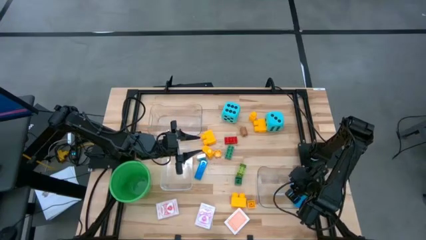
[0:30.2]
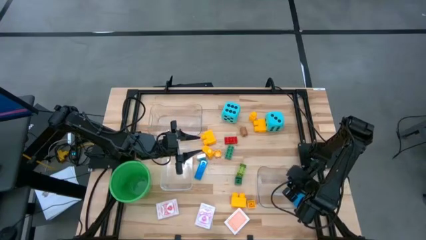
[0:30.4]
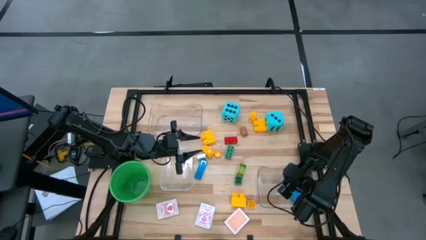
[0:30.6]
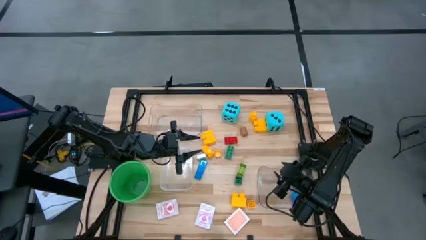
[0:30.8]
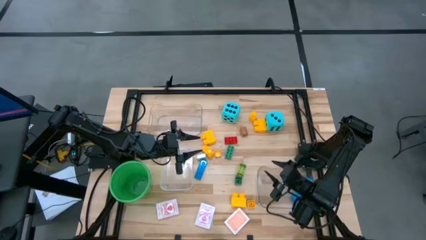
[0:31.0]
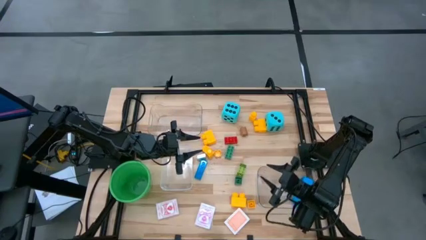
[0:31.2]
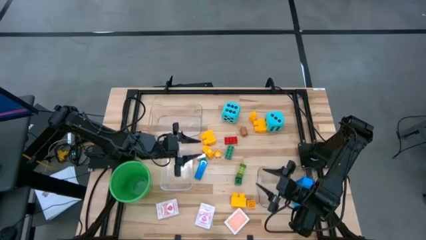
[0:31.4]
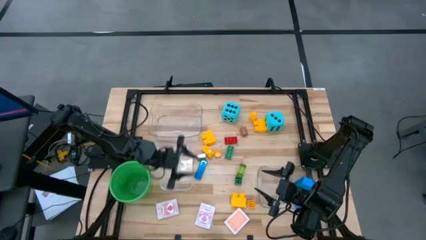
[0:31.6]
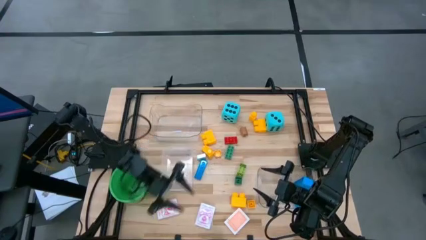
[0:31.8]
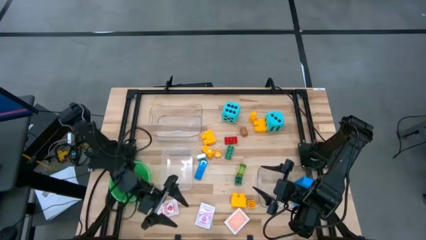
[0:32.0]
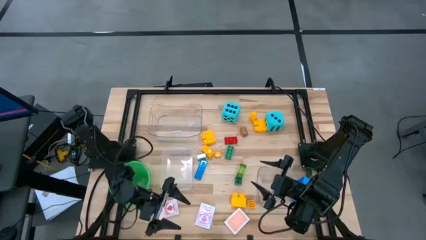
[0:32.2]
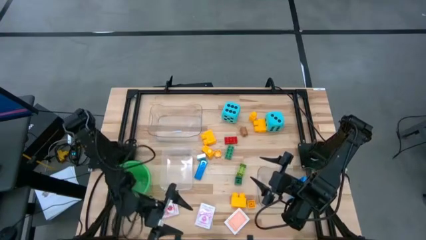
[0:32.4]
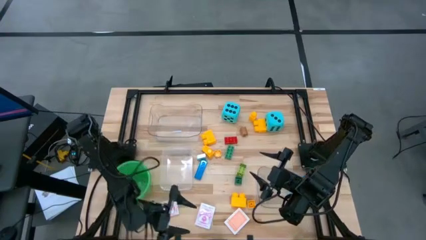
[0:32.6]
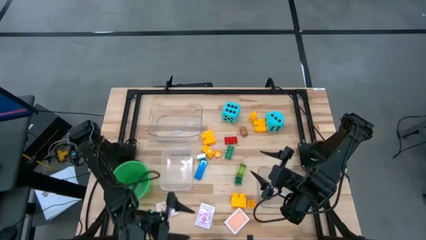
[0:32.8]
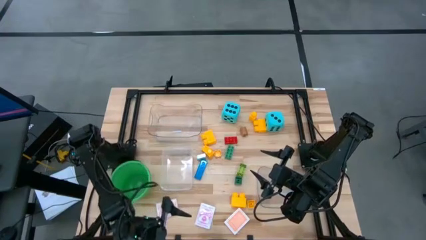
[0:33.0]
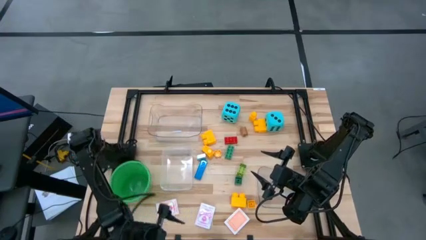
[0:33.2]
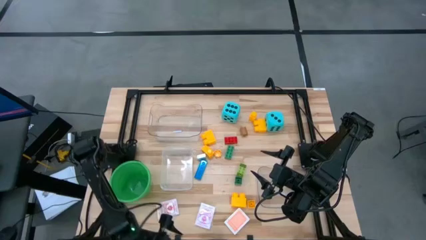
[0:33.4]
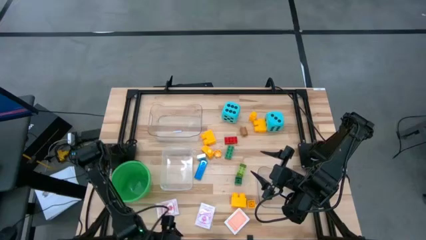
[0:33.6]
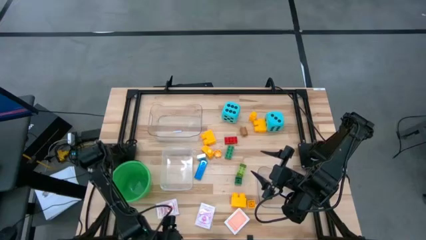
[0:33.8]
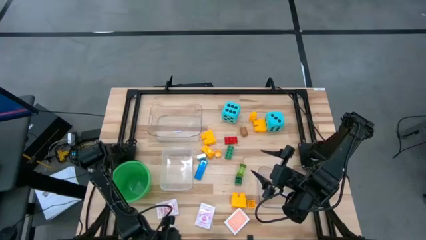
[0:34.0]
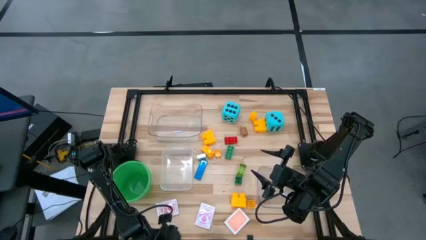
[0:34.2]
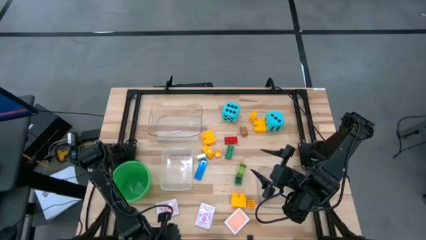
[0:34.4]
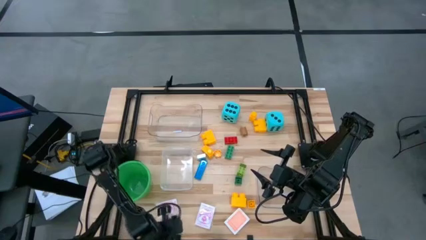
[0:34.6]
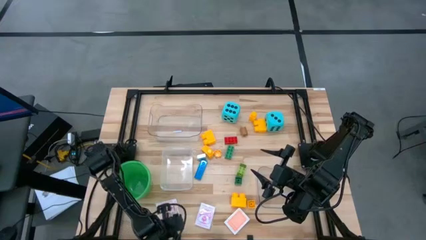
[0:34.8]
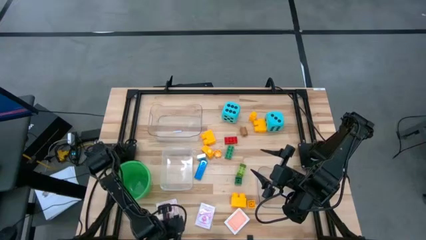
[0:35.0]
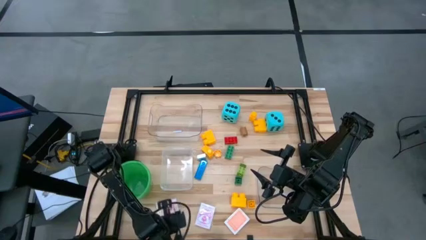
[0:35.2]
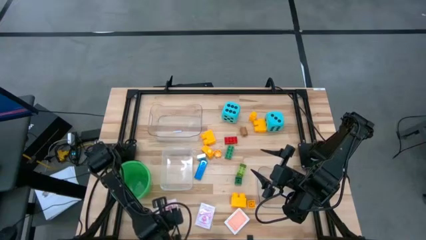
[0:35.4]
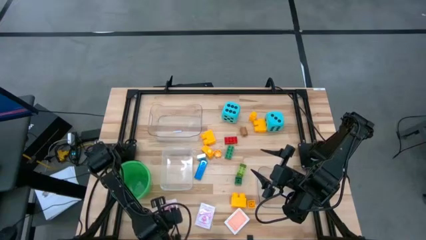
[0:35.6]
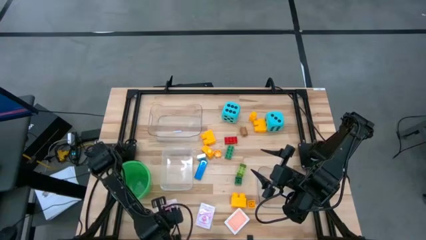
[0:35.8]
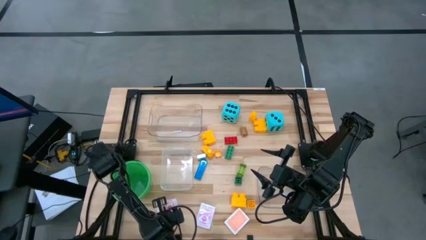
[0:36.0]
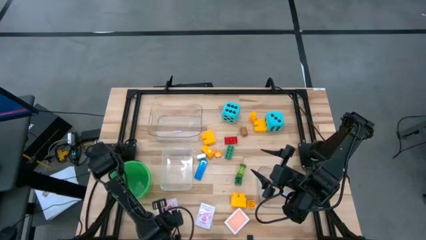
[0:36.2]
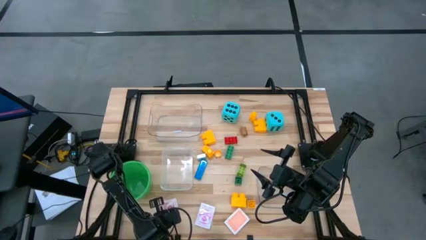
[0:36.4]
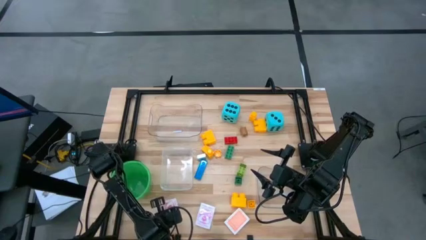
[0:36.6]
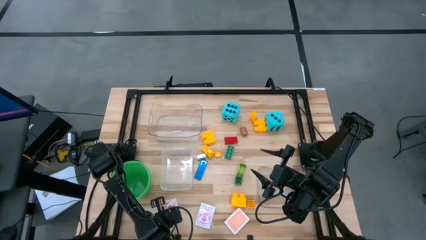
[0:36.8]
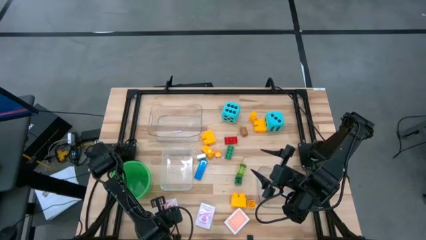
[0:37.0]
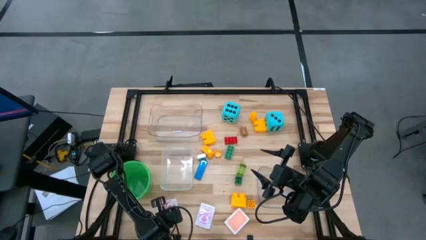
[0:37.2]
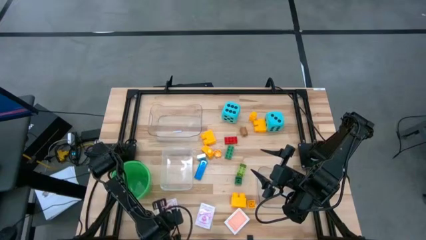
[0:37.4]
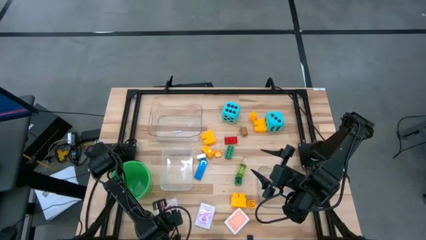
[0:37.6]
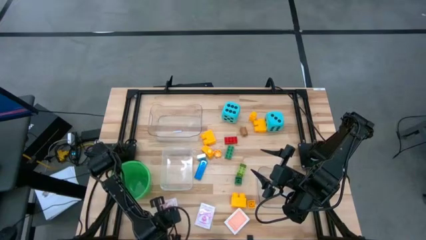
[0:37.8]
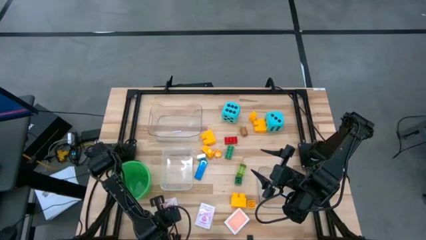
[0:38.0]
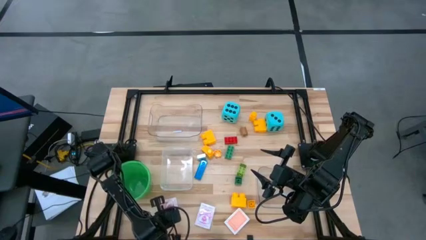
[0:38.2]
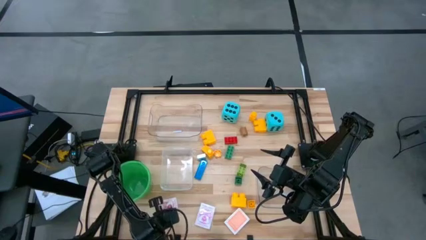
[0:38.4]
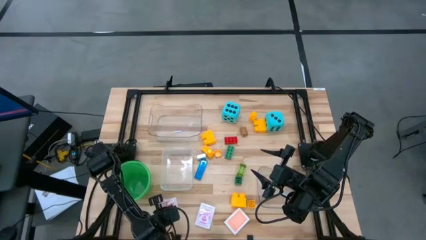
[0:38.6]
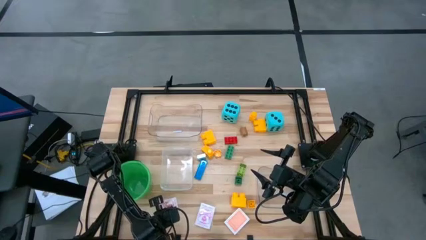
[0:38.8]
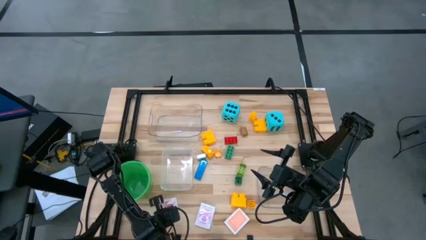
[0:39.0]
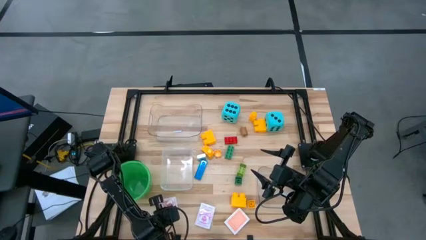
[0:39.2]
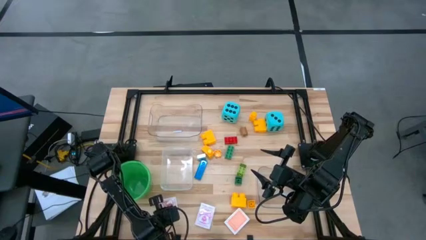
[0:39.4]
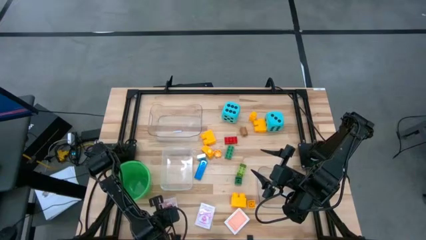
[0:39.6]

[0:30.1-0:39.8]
Task: Pick & Place Toys
Put the red playing card box into the bottom left transparent bin

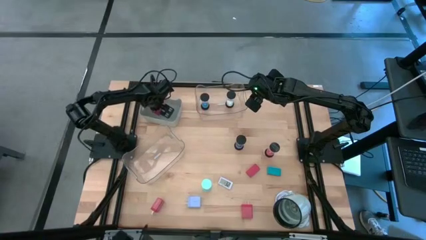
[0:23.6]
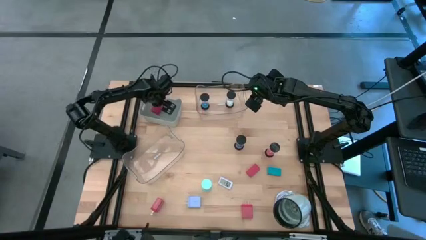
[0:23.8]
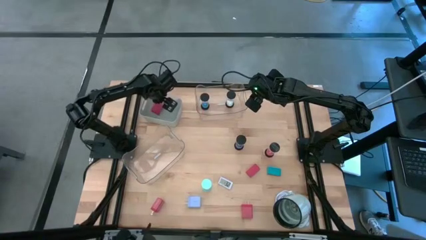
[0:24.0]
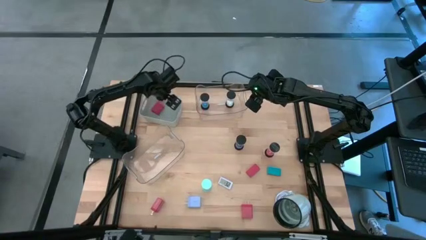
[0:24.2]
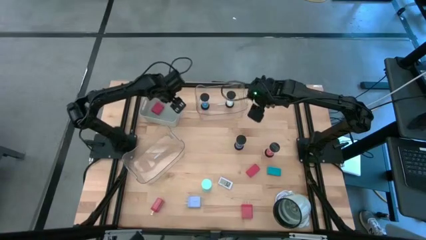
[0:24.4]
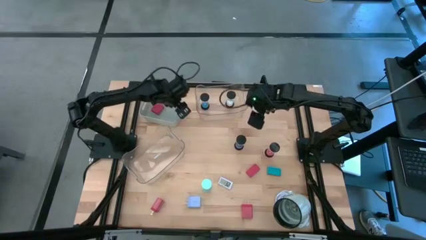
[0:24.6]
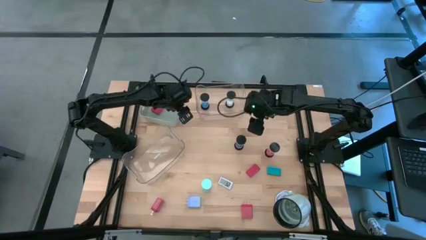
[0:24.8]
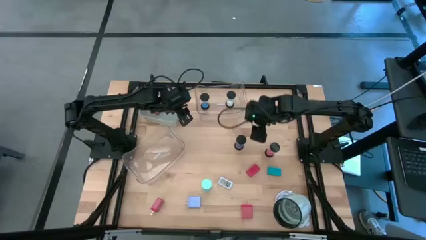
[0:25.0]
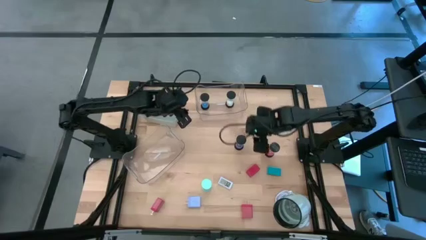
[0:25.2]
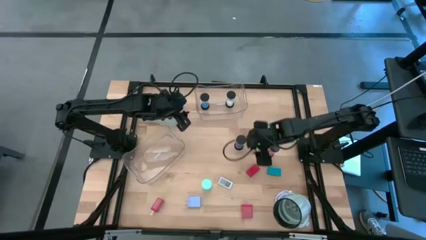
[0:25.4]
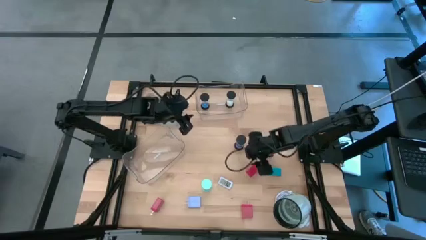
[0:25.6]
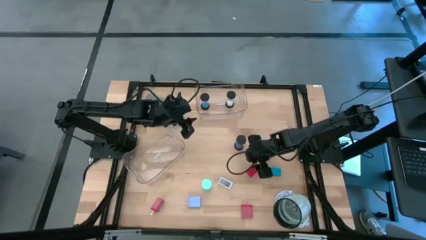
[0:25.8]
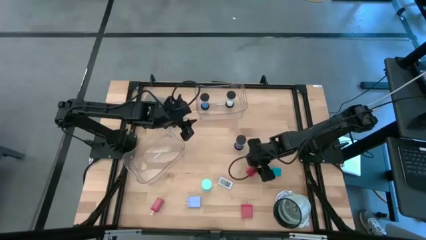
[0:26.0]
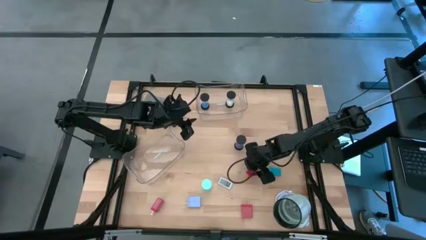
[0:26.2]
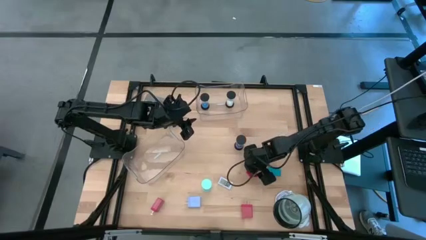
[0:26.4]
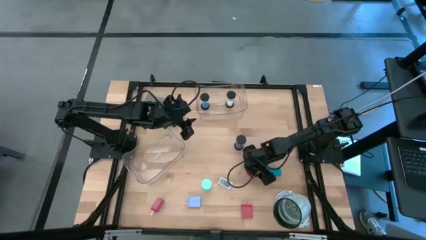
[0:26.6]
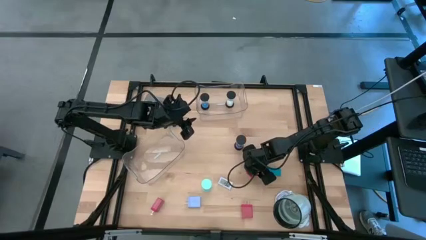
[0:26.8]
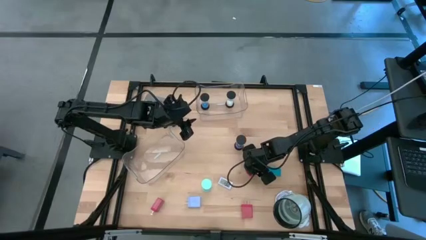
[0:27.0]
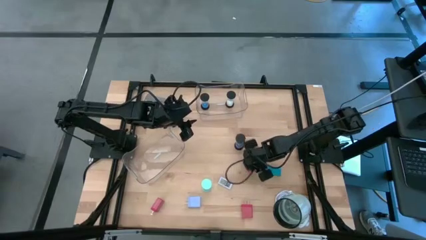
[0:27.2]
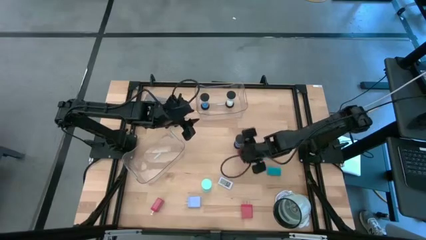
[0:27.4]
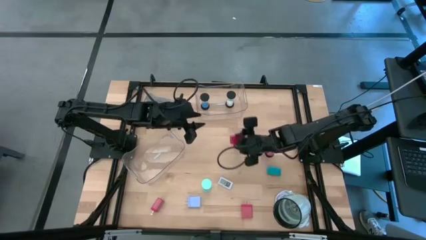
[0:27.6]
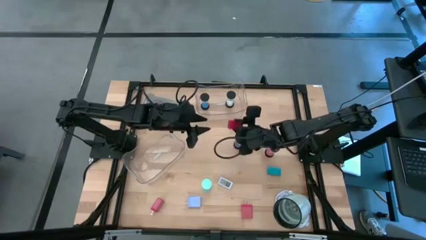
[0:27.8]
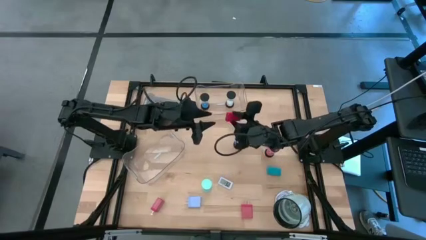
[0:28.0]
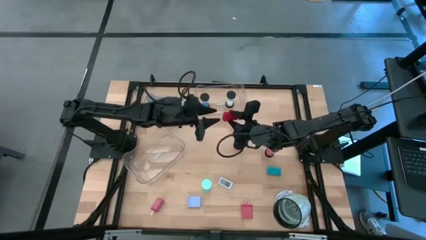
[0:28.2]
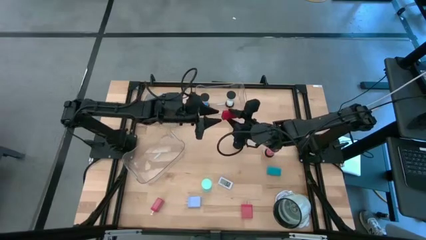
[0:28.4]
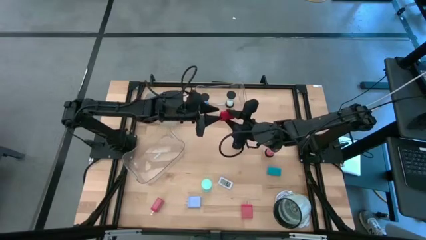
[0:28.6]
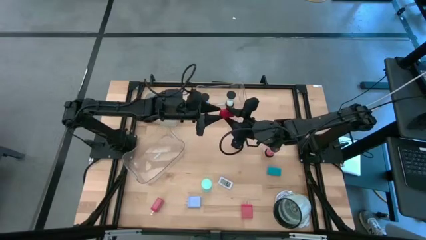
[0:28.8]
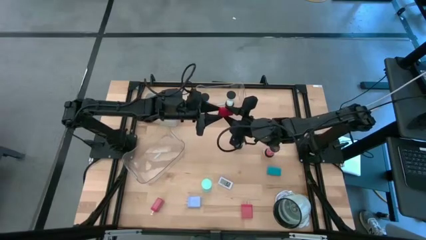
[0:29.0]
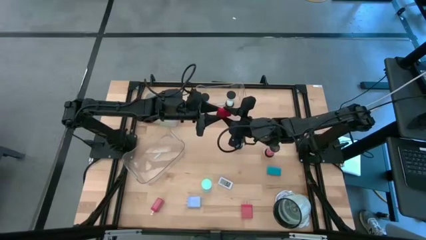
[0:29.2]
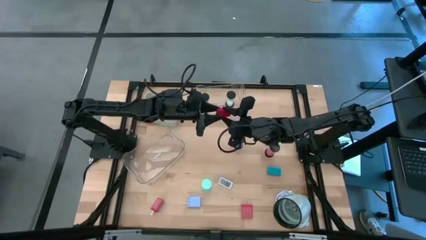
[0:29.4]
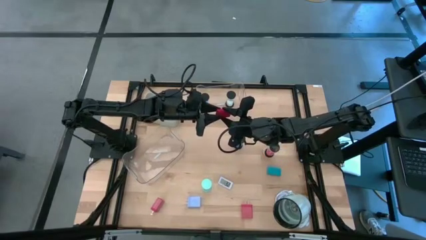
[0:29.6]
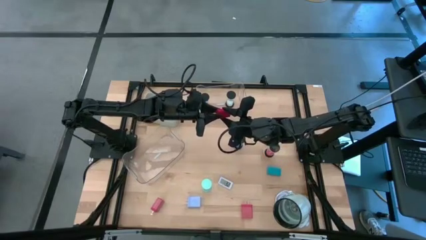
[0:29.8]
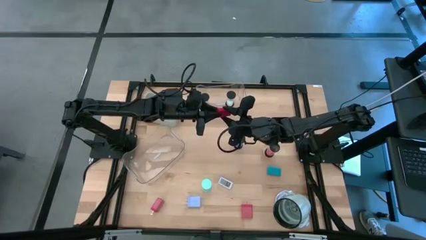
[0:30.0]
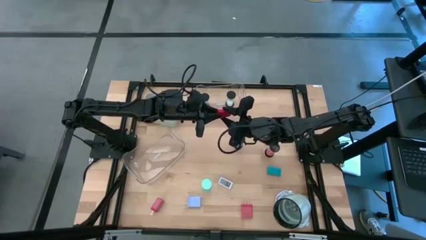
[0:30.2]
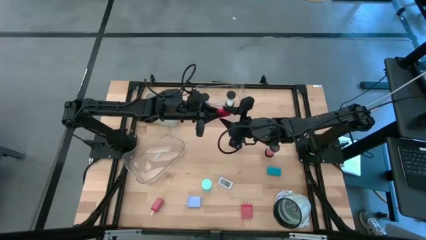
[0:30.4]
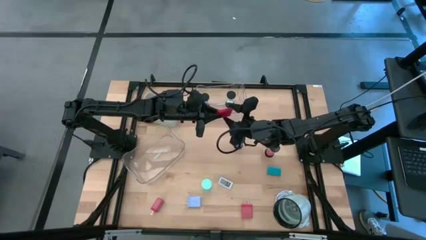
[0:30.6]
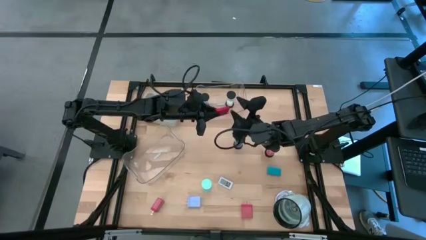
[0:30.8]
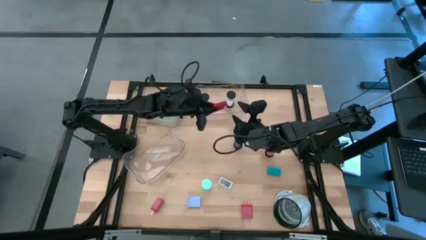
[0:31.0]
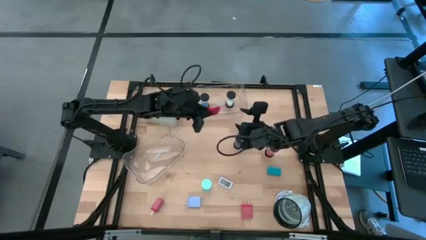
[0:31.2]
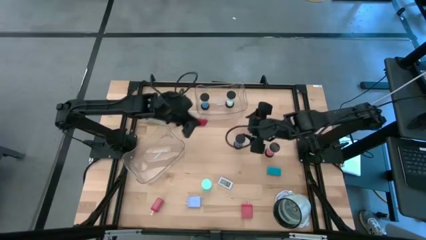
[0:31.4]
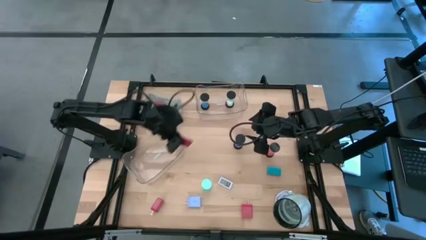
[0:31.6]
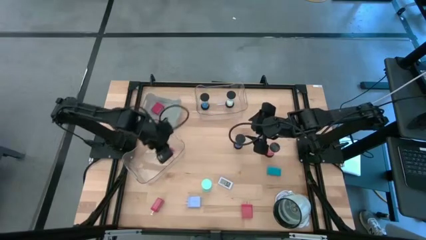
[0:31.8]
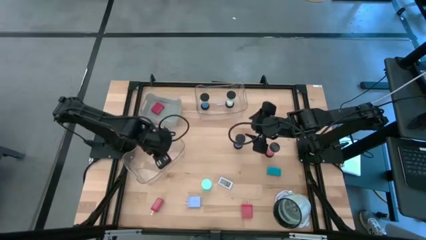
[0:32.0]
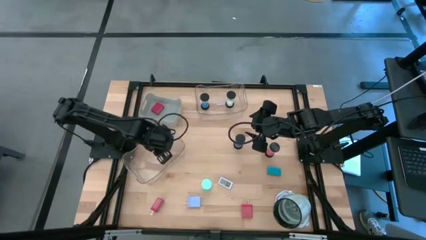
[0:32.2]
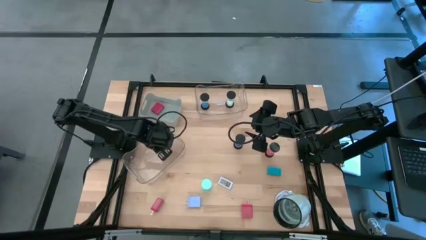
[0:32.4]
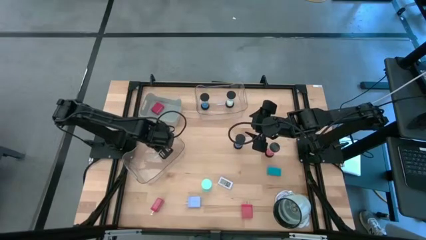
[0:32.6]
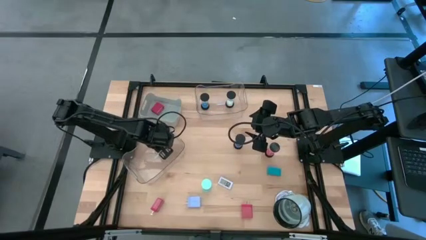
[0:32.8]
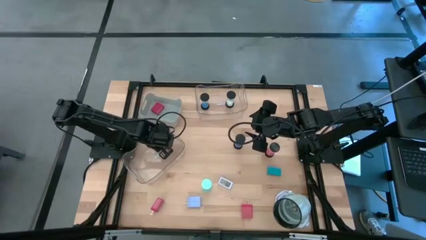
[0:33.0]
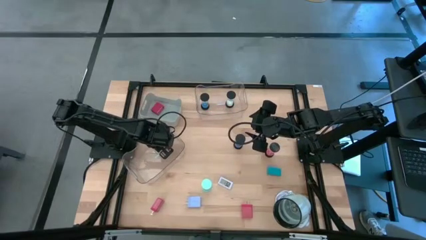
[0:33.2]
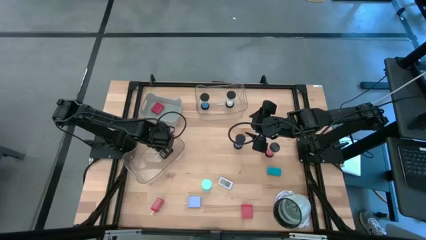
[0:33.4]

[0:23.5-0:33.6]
Task: Pick & Place Office items
Put the red digital clock into the bottom transparent bin
